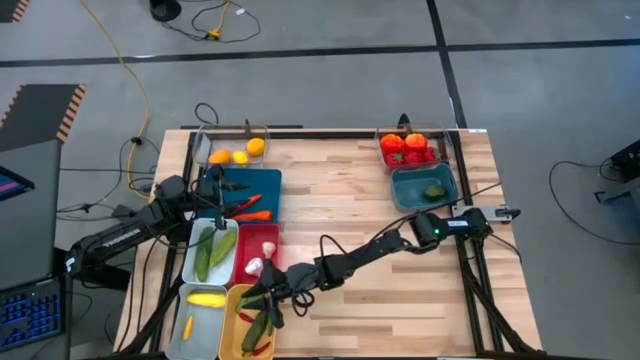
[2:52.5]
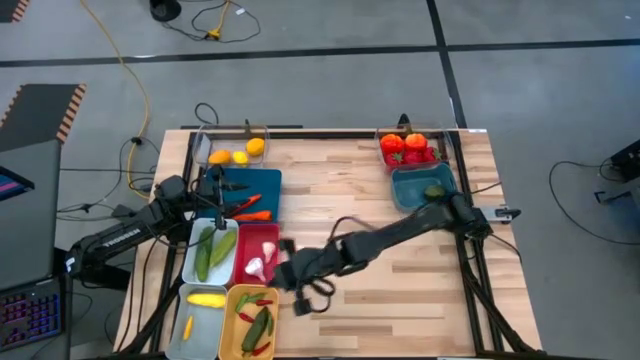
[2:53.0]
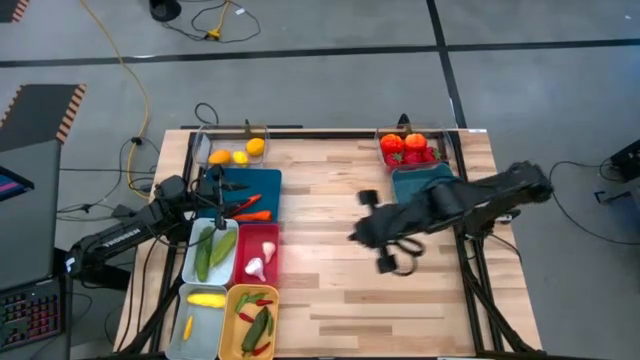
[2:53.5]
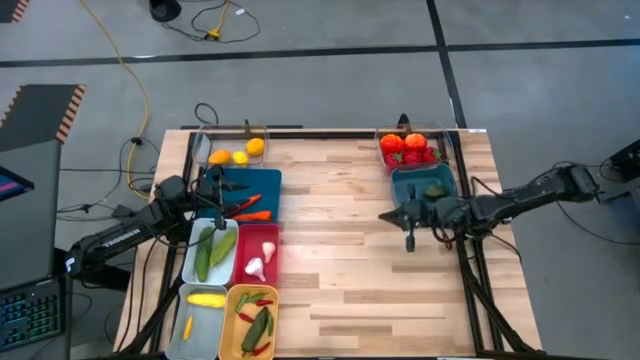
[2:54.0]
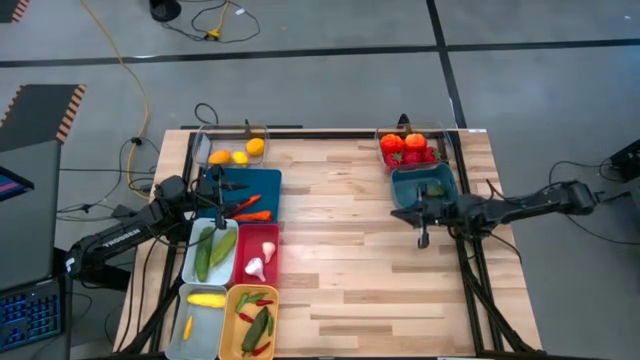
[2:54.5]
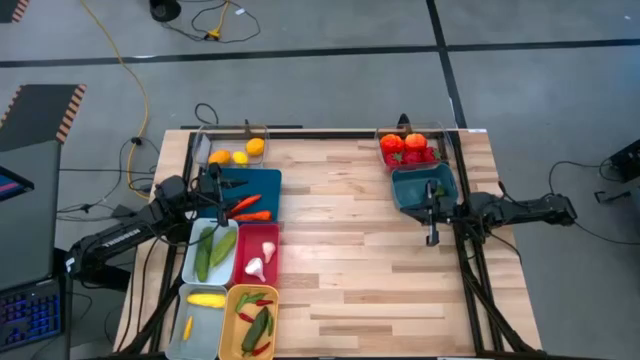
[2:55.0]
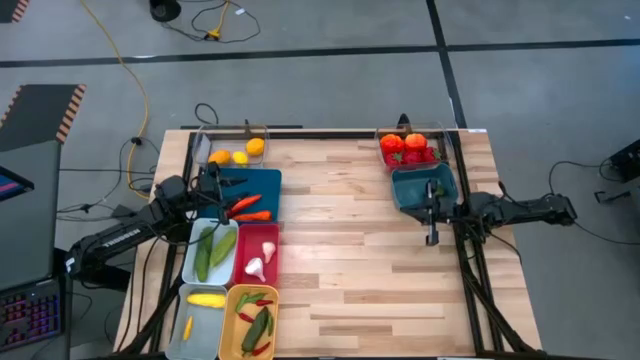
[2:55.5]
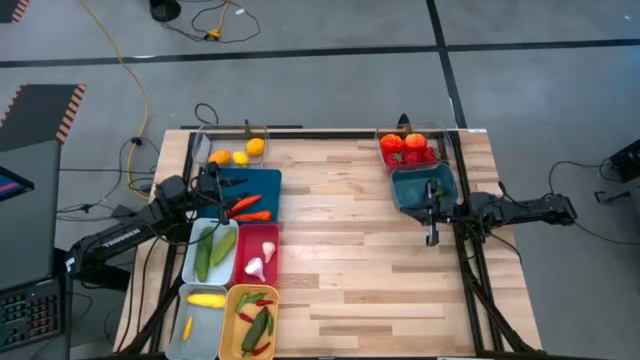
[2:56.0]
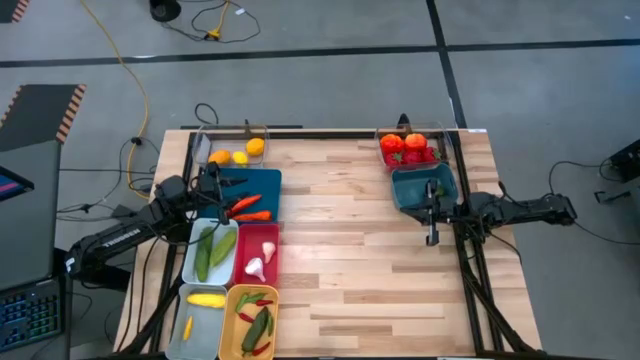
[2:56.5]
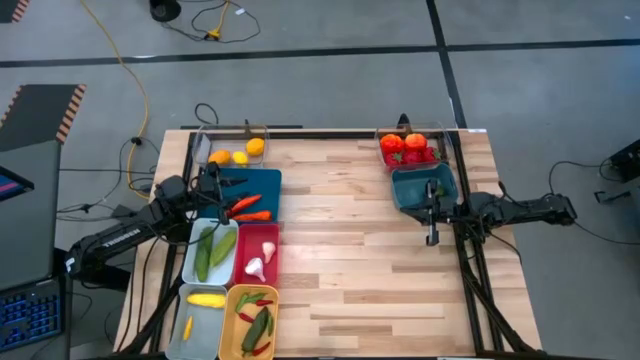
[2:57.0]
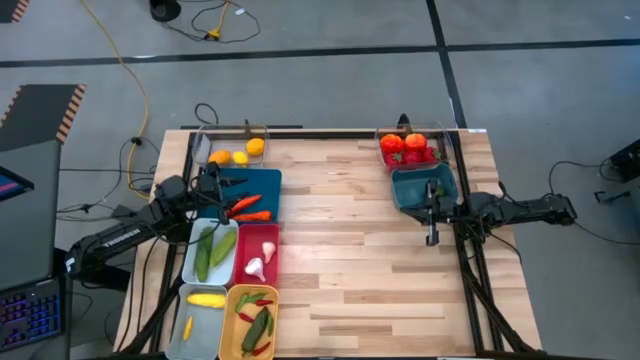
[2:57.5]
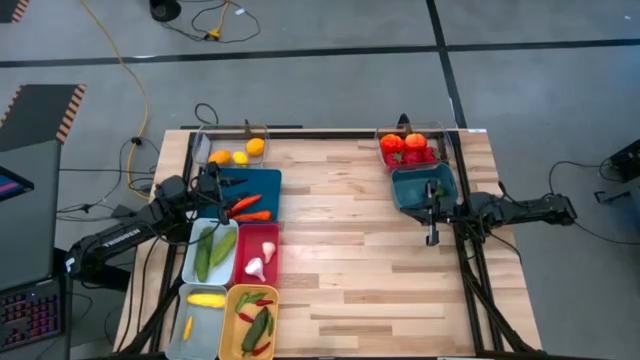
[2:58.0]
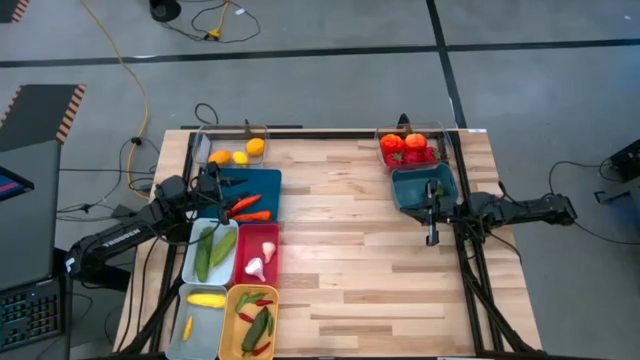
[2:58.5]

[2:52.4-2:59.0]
Task: Sort produce into baskets
Return to Home Position

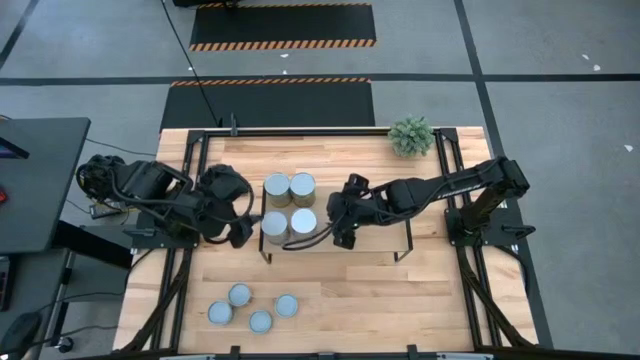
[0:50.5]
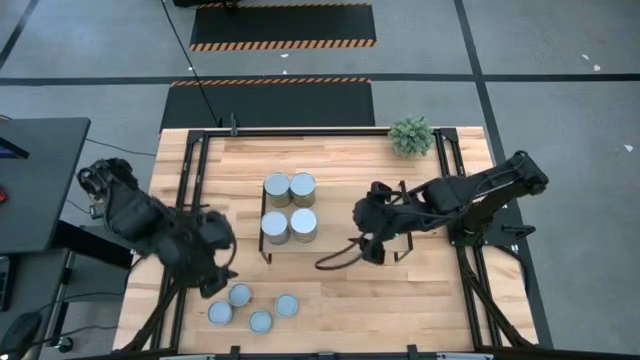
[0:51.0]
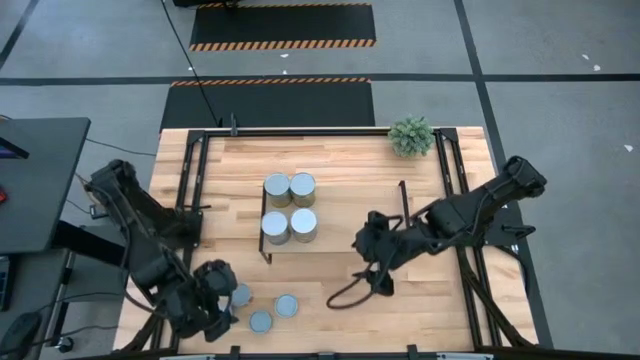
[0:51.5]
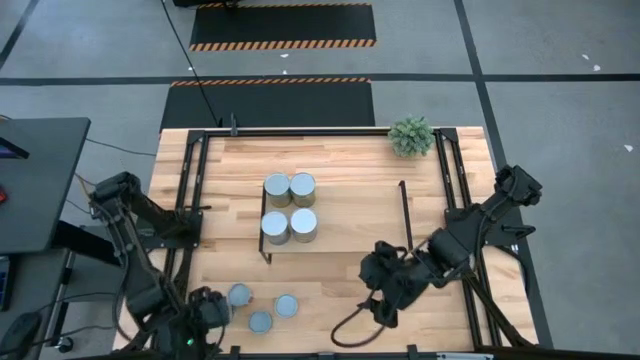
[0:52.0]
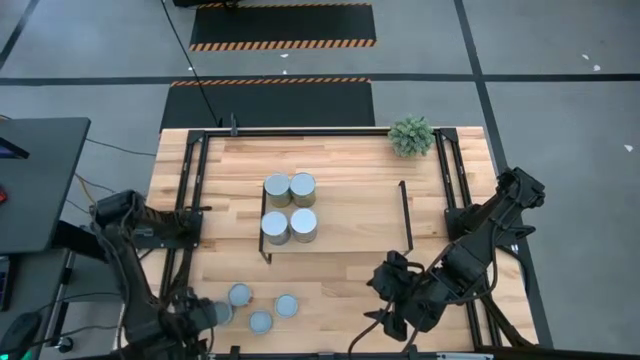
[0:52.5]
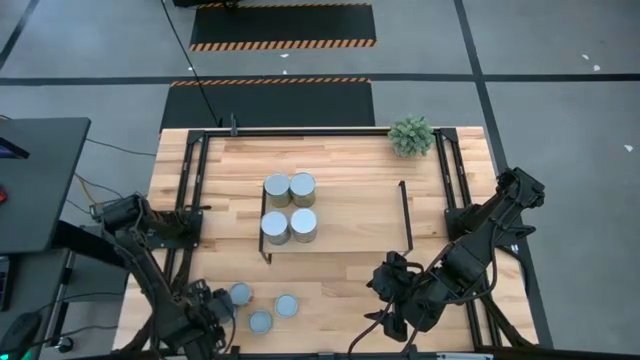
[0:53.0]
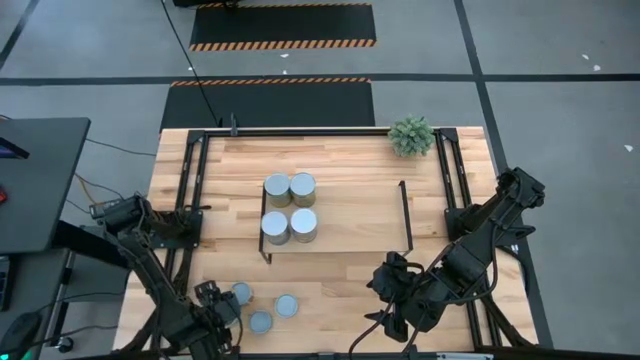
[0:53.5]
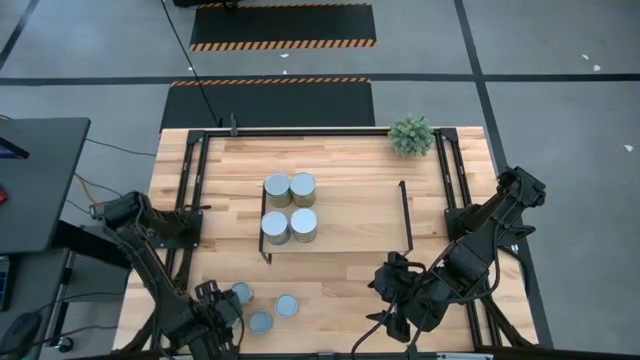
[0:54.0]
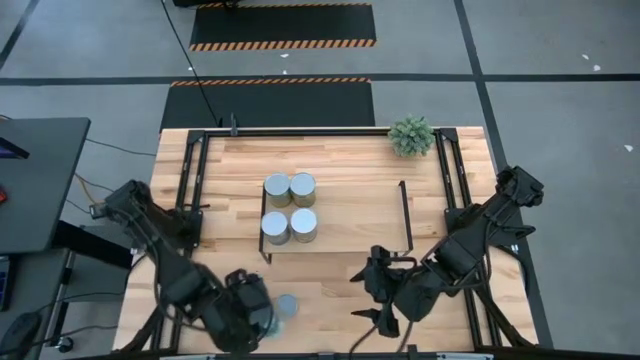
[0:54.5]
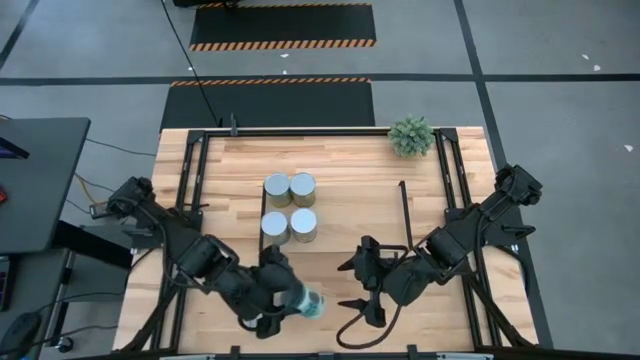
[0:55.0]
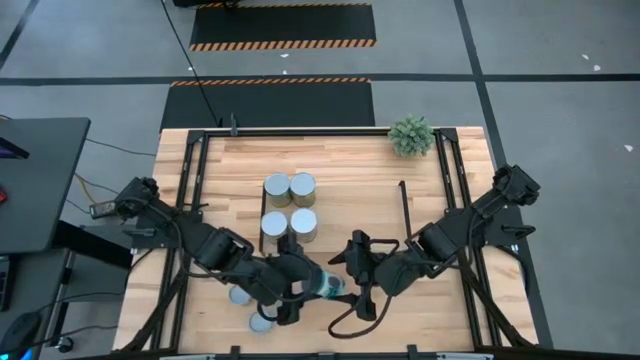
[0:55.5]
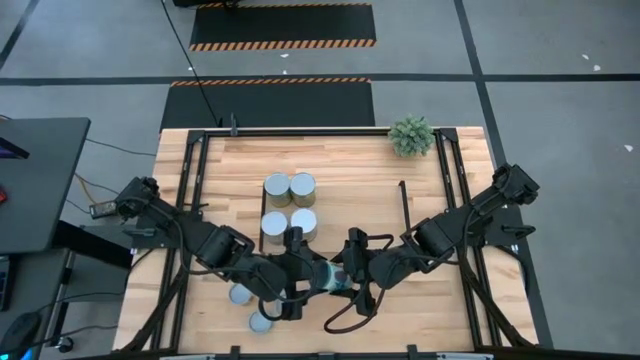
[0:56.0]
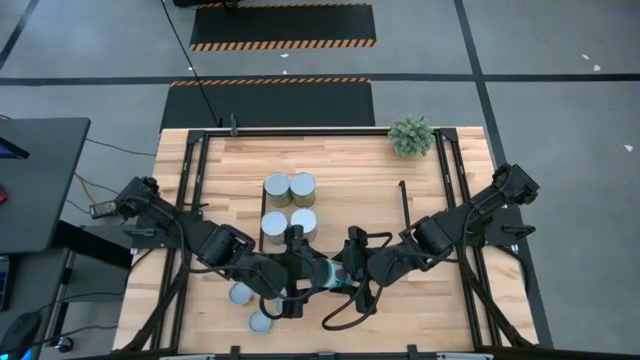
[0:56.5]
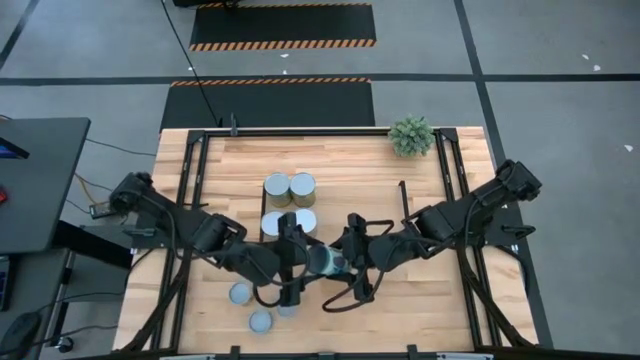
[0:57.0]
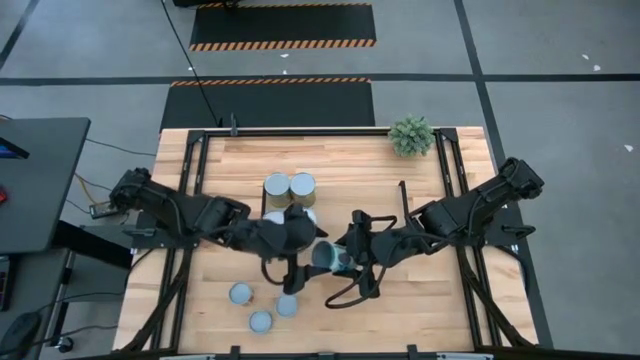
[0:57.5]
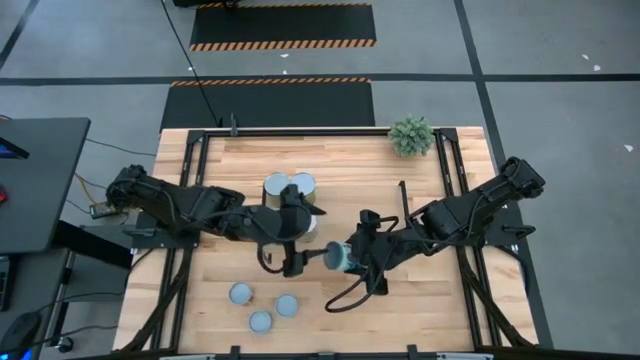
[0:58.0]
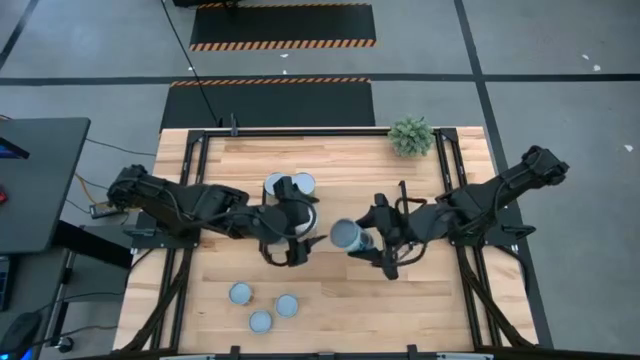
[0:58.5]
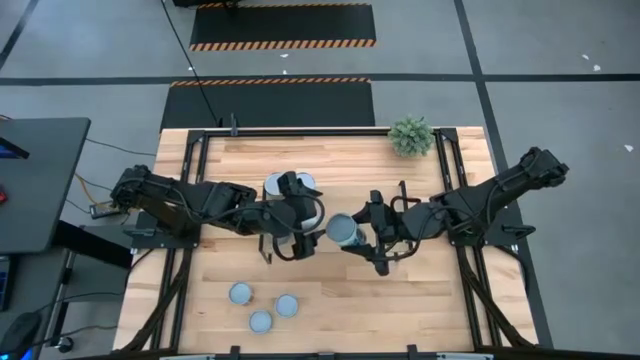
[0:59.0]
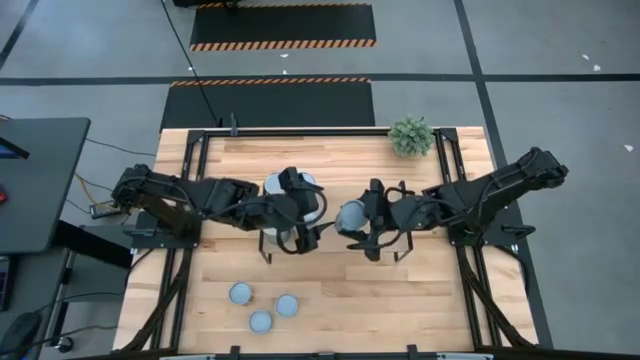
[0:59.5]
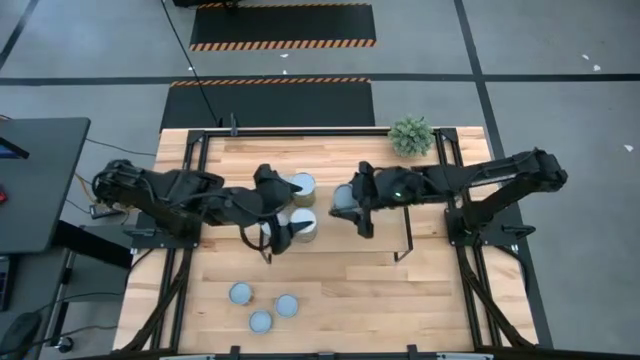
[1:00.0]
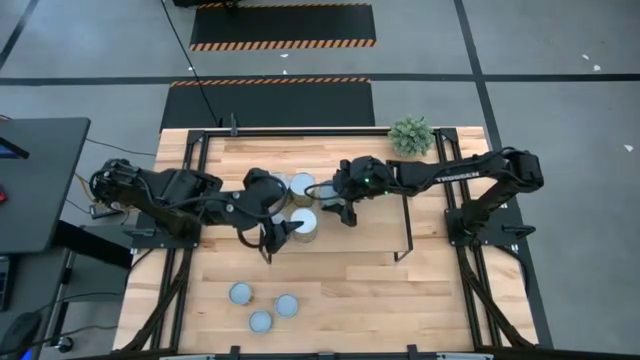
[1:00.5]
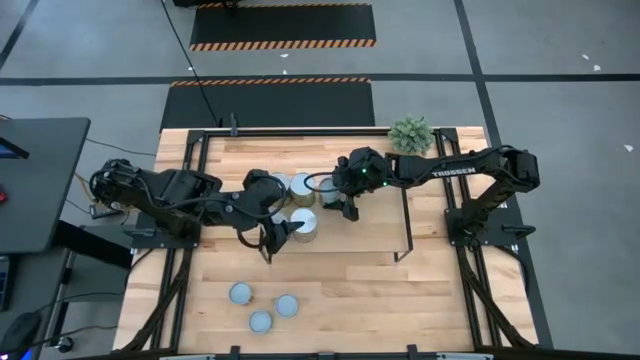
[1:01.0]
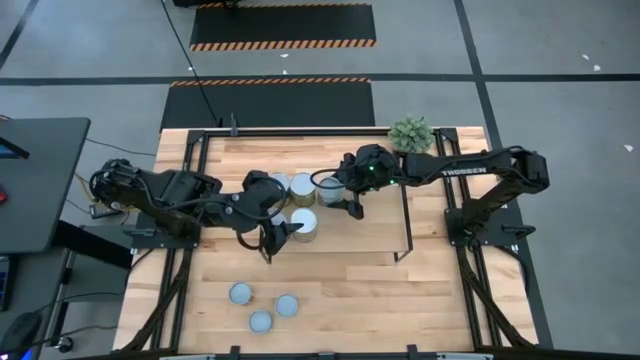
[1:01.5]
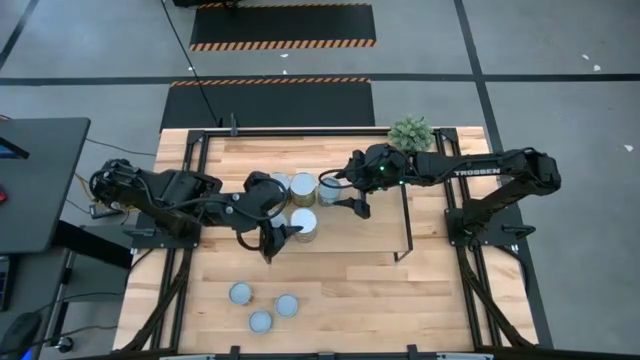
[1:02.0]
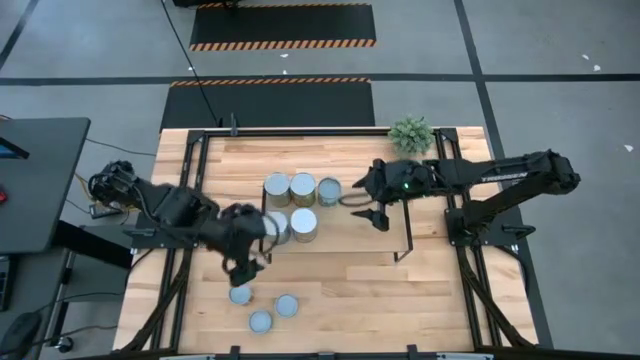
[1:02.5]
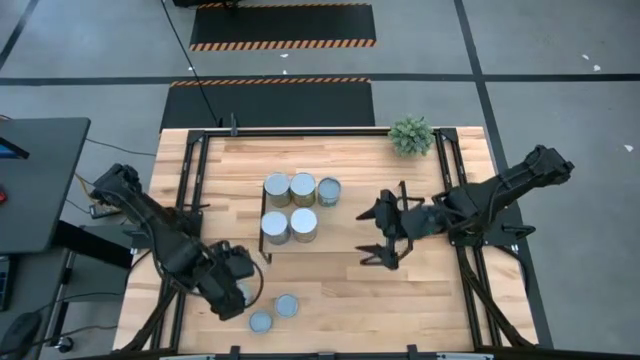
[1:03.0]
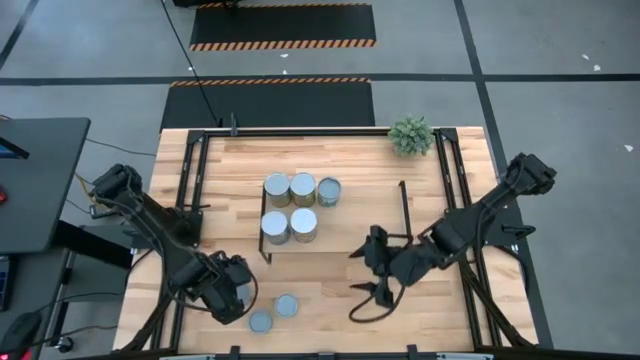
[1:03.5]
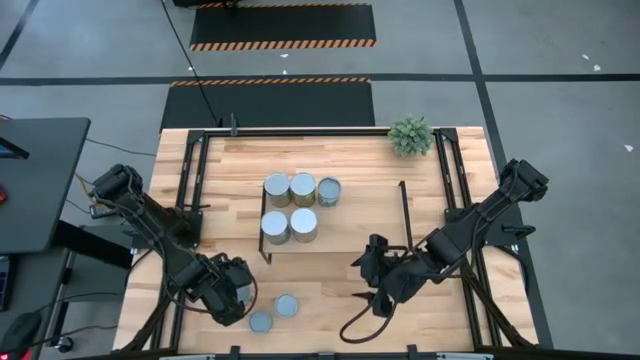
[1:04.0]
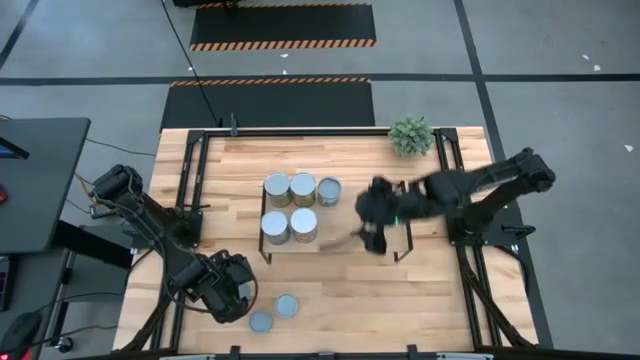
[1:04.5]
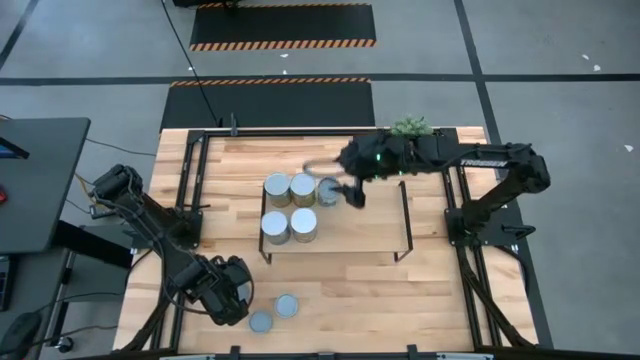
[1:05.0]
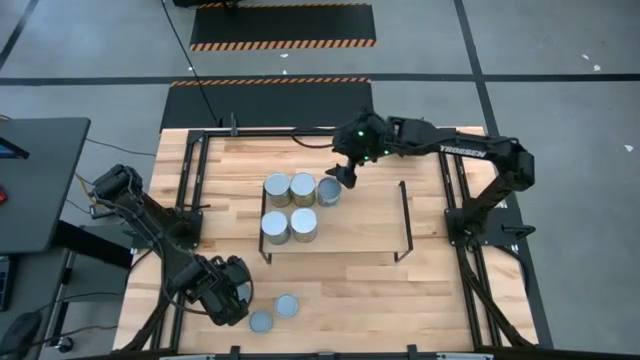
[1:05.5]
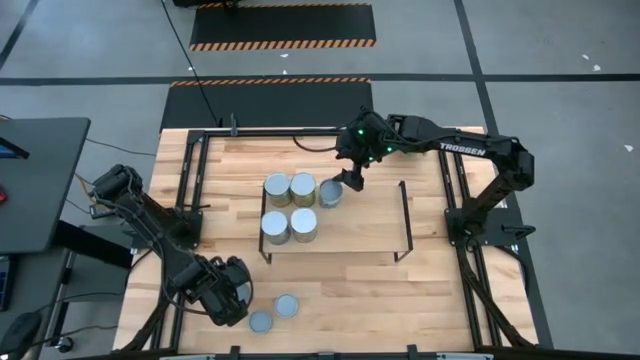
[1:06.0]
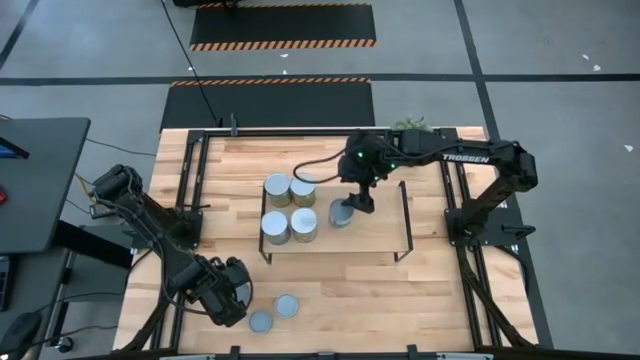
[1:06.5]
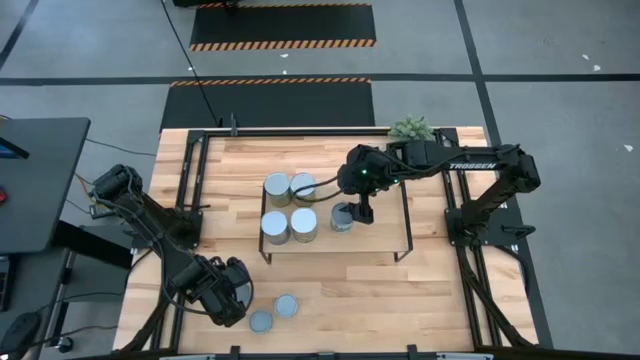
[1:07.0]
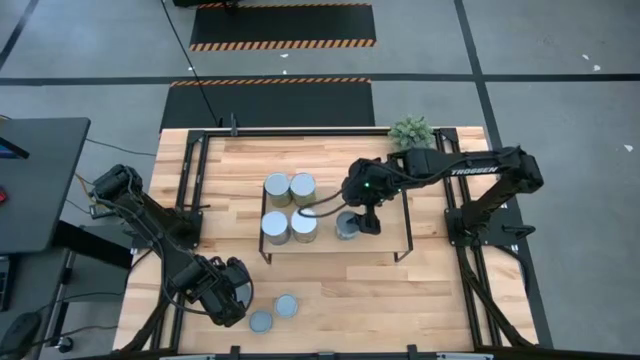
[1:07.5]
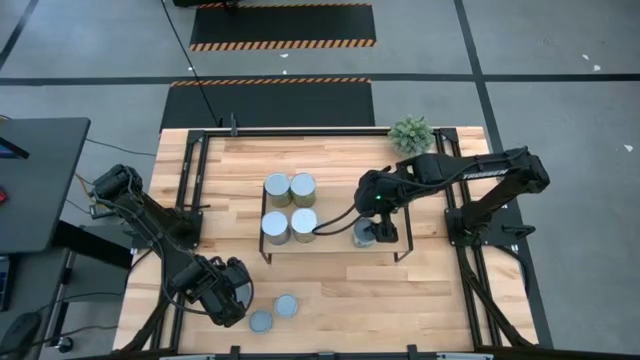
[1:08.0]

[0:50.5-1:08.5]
Task: Pick and place cans onto a shelf
Put the canned mix vegetable on the shelf
